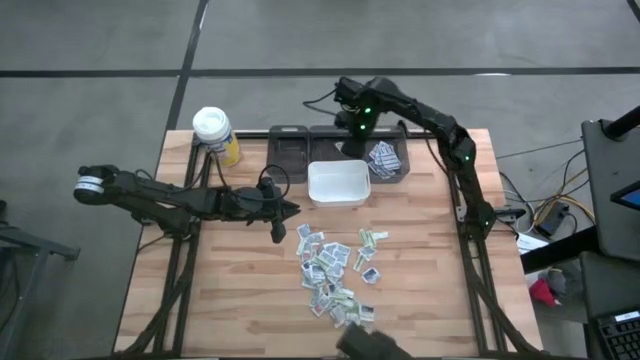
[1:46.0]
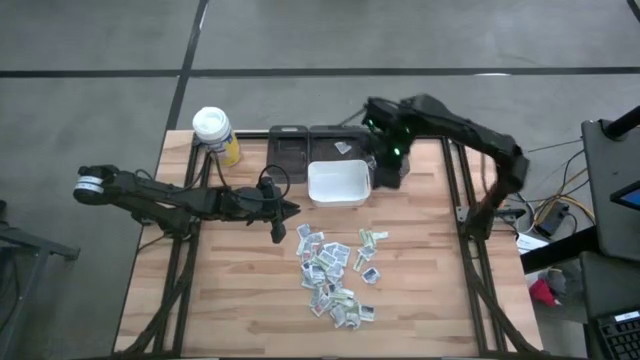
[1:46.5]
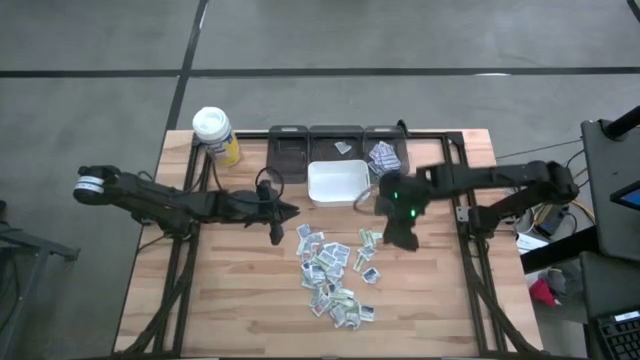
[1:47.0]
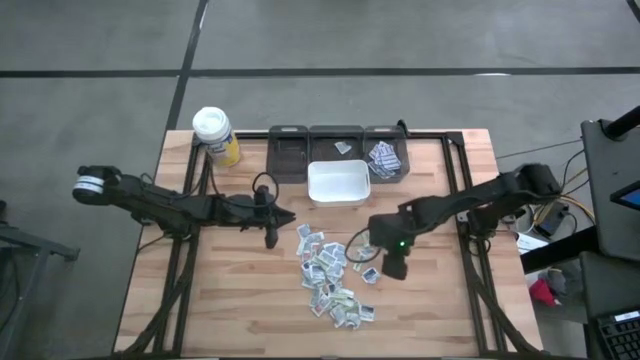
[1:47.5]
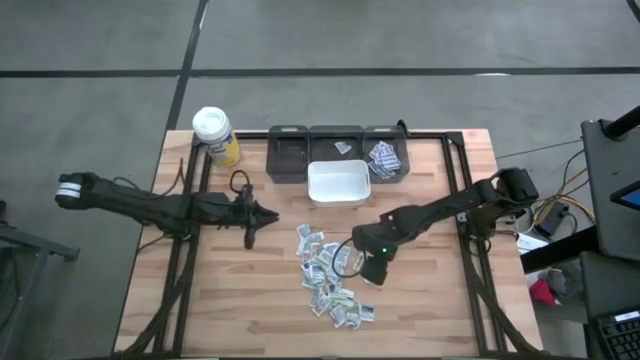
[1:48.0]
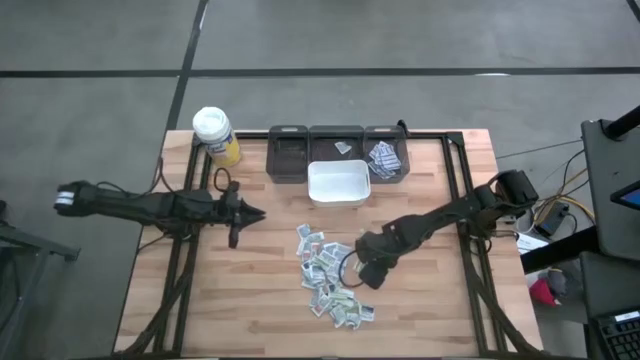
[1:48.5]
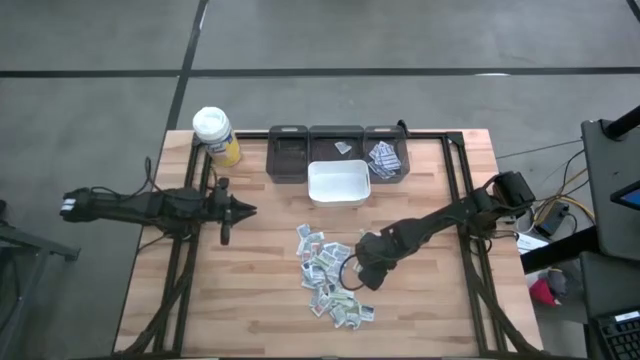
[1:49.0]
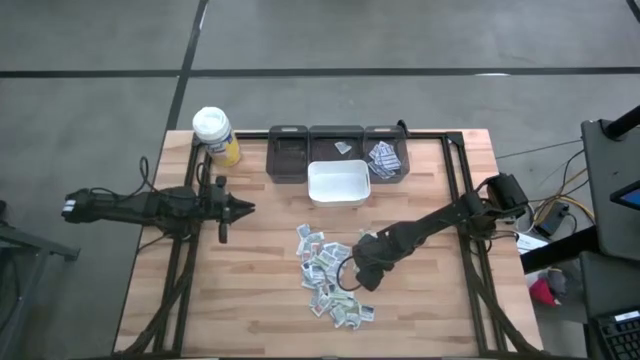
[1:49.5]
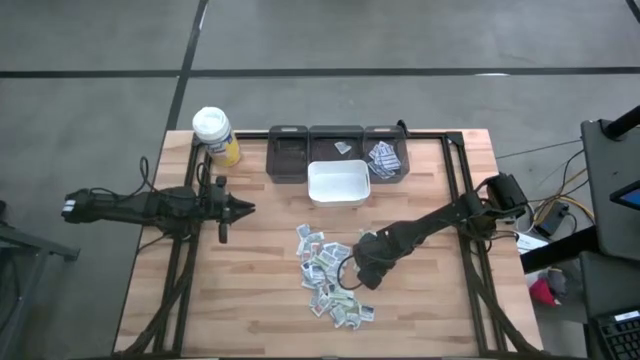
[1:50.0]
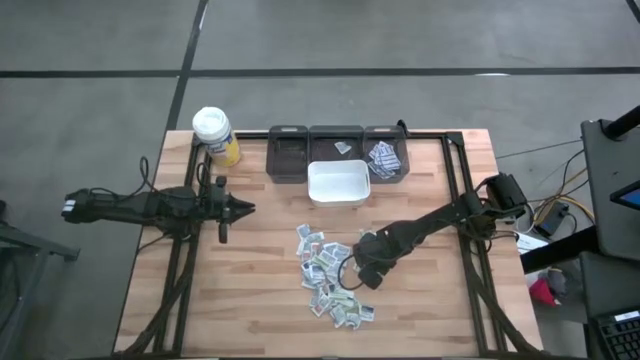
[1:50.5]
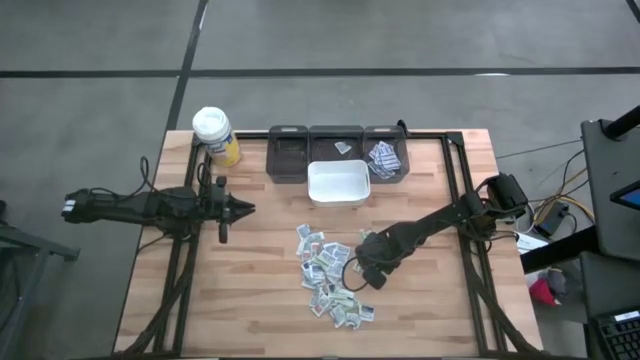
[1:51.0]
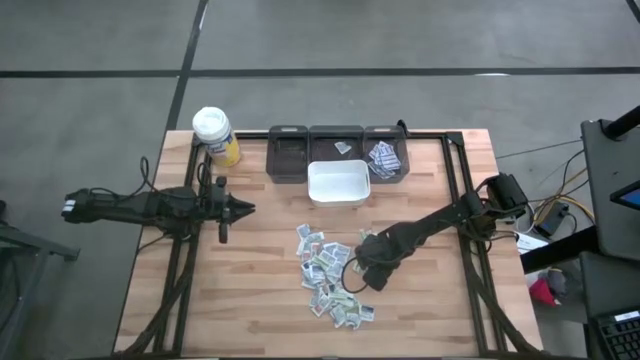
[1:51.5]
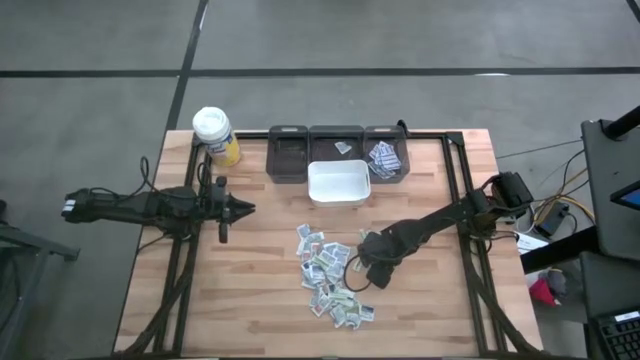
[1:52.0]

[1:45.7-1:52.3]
Task: Pick & Place First Aid Supplies
Put the alcohol pad into the middle black bin

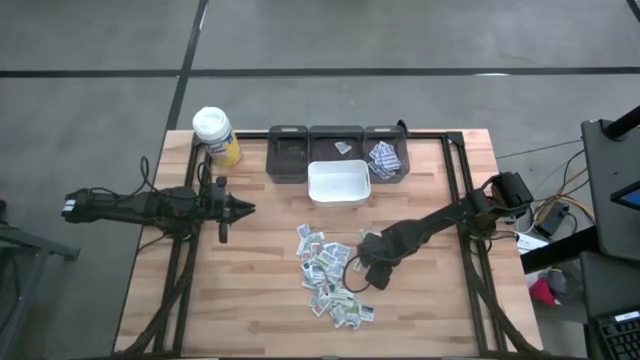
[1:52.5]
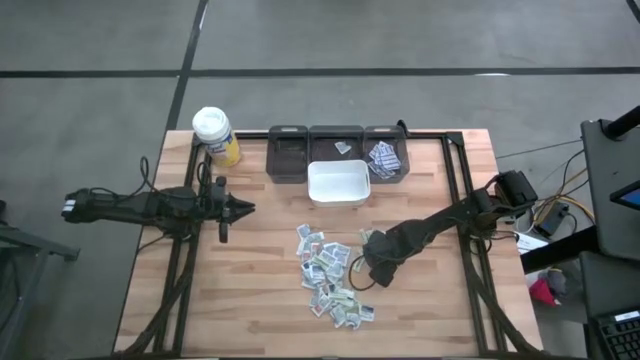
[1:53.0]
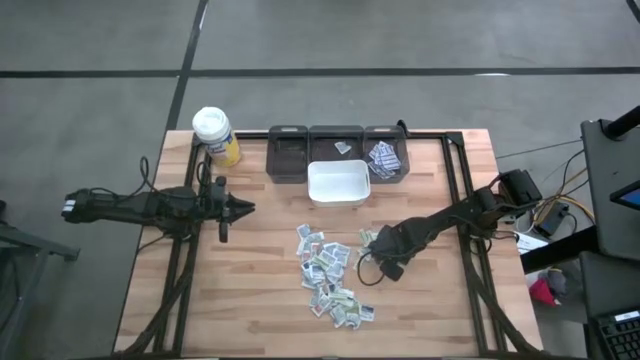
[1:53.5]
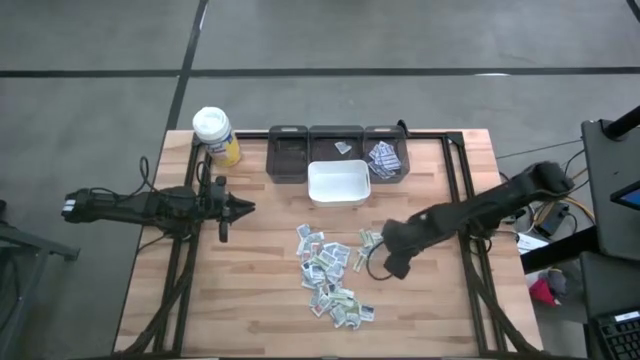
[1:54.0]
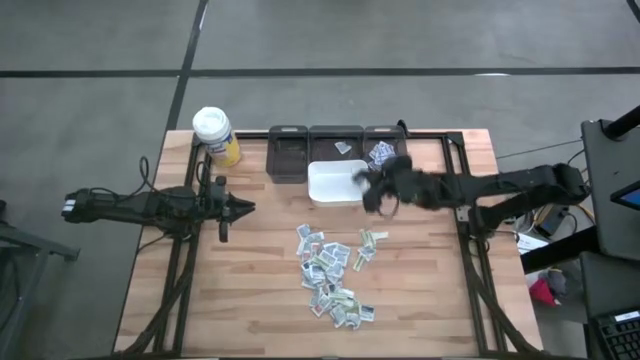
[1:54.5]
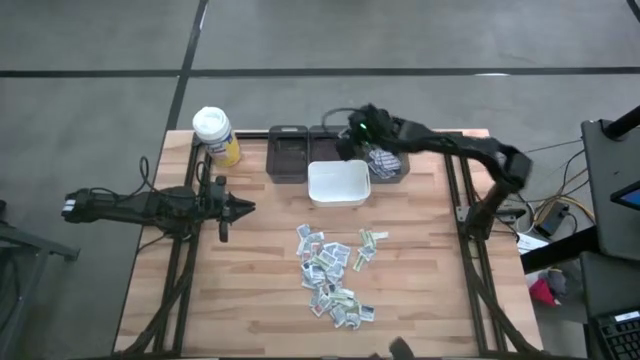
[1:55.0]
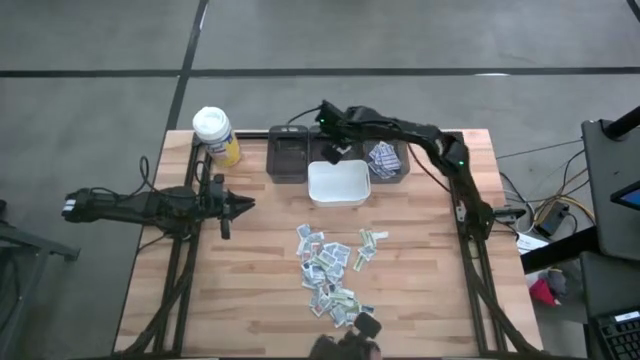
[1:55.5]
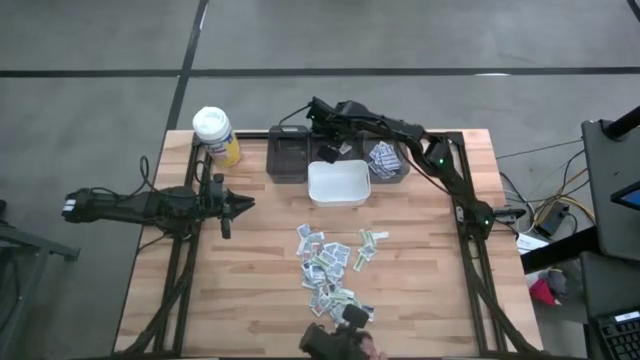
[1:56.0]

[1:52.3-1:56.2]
Put the alcohol pad into the middle black bin

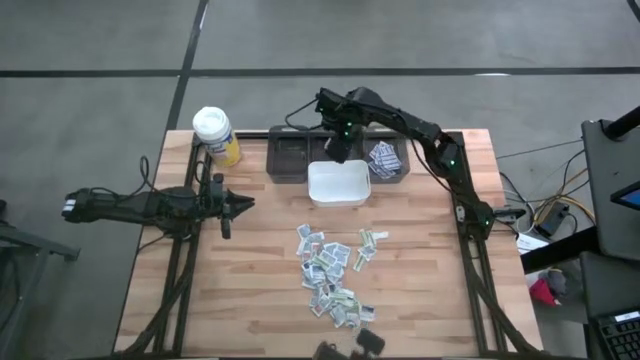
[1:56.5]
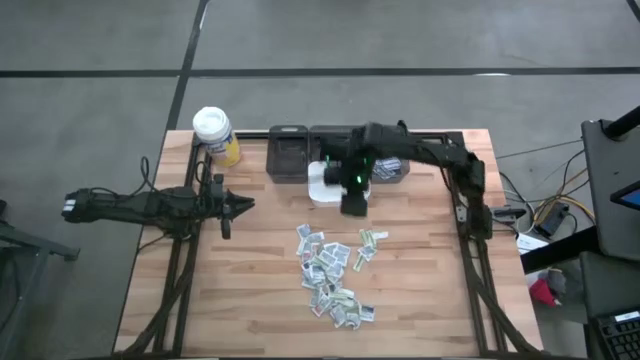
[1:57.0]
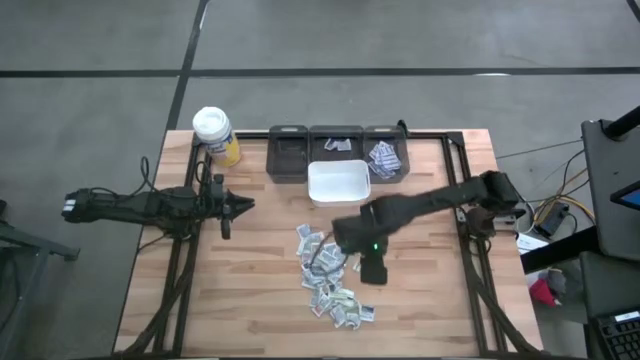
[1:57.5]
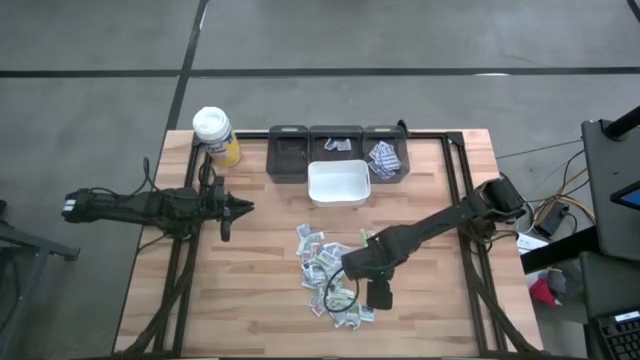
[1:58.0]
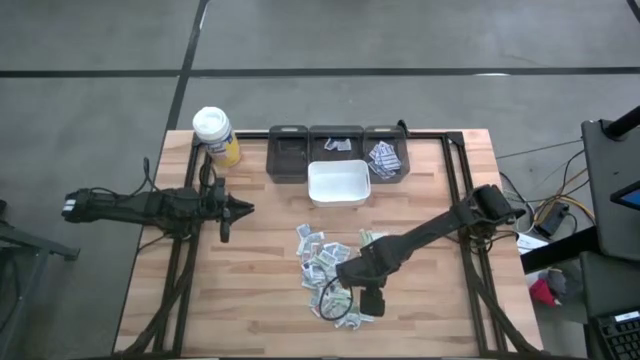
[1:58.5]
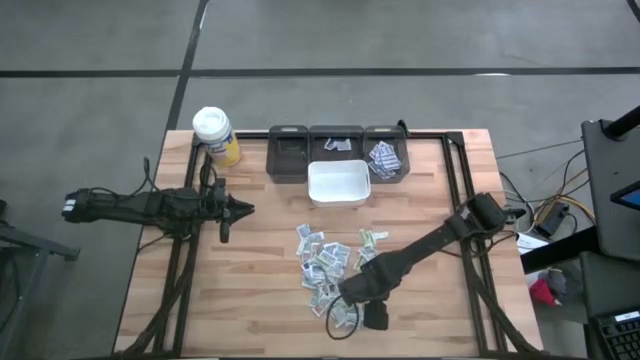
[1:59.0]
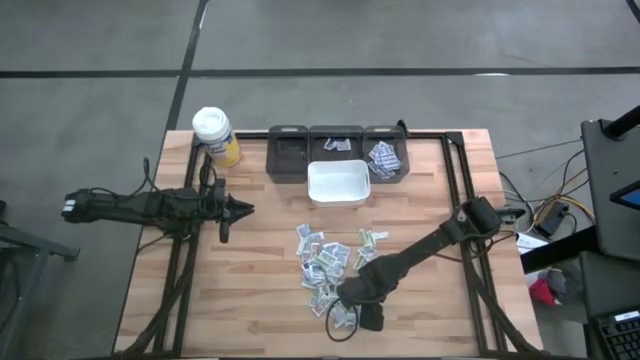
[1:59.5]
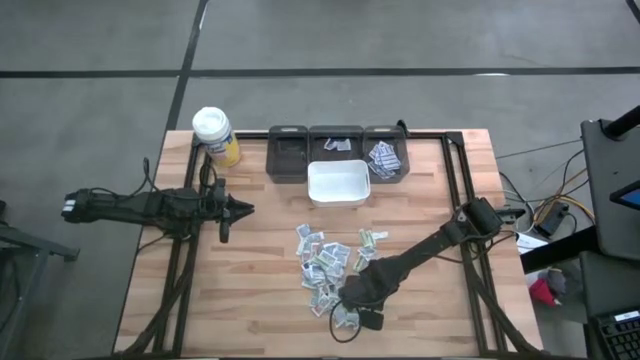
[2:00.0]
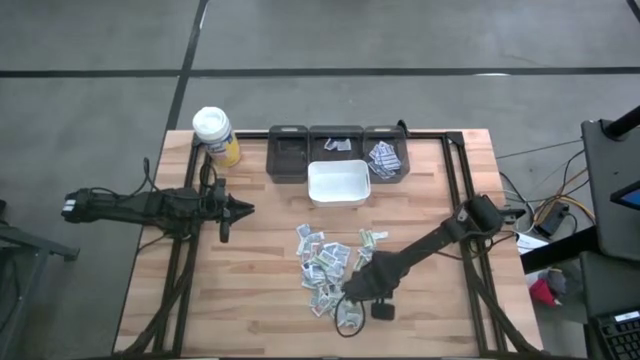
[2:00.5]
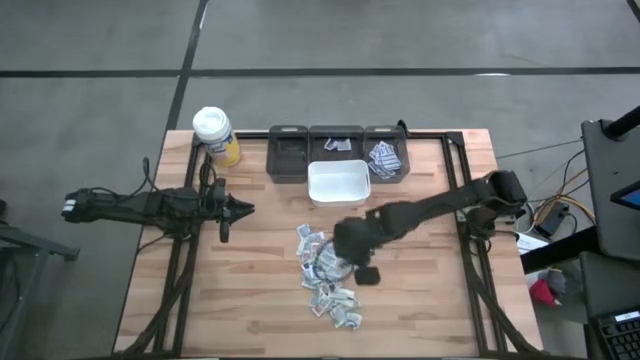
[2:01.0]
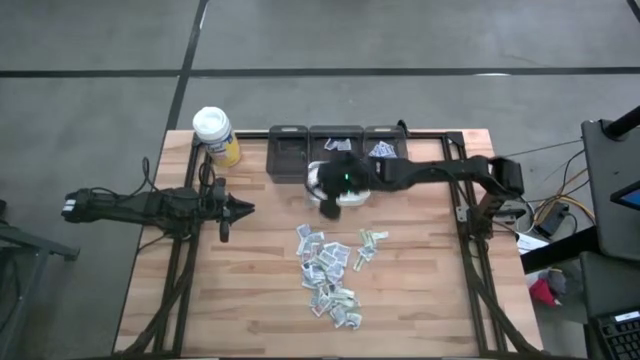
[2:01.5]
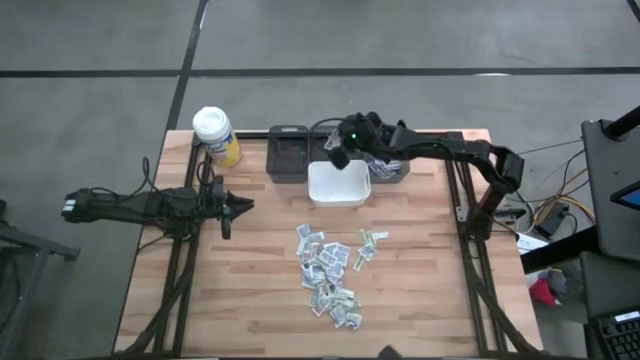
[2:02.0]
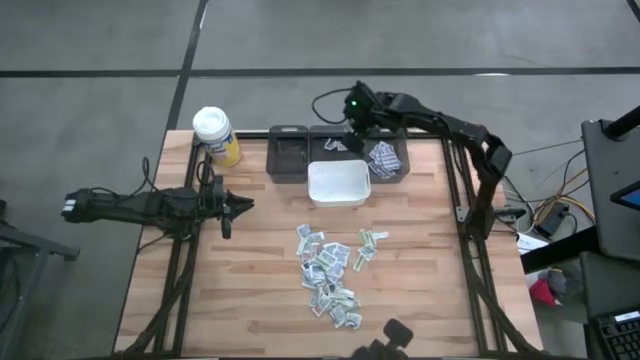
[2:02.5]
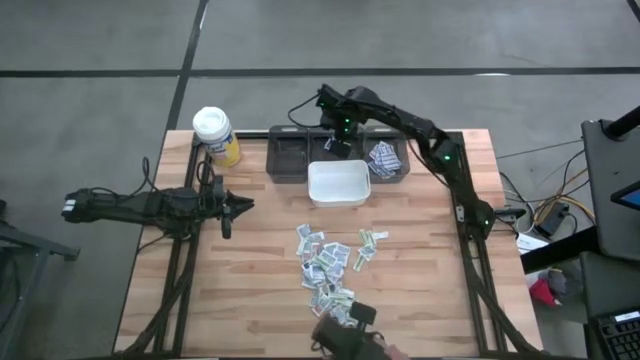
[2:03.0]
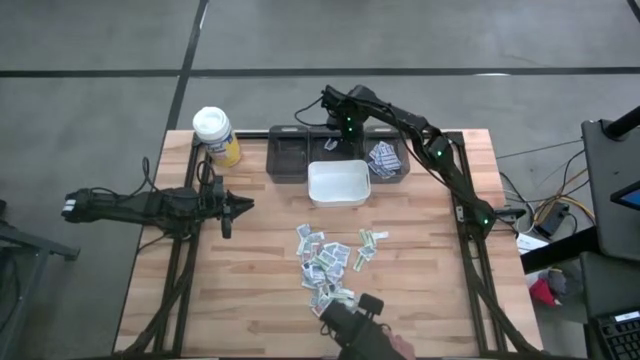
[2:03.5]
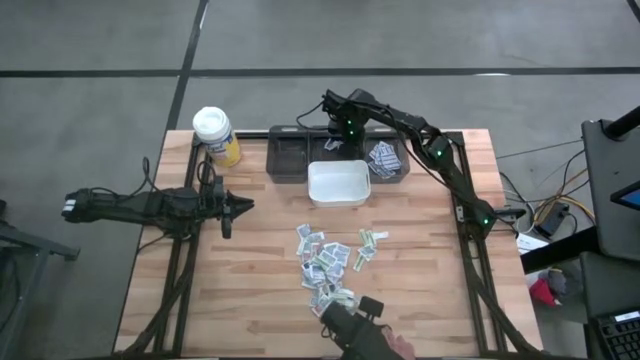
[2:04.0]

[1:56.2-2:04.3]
Put the alcohol pad into the middle black bin
